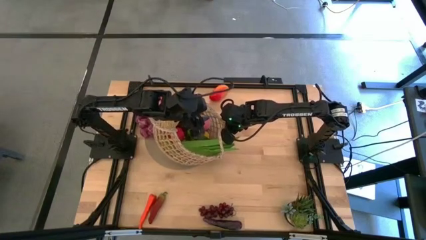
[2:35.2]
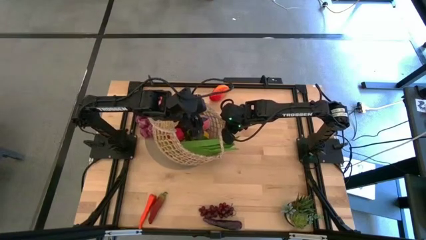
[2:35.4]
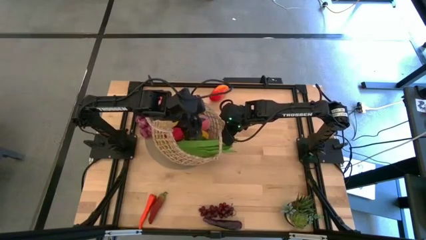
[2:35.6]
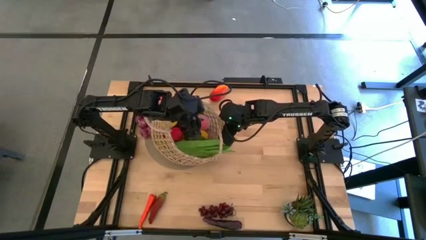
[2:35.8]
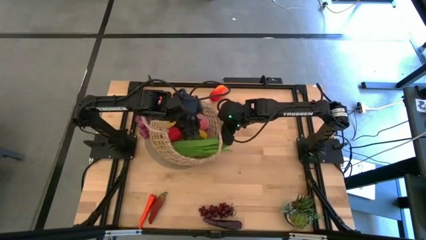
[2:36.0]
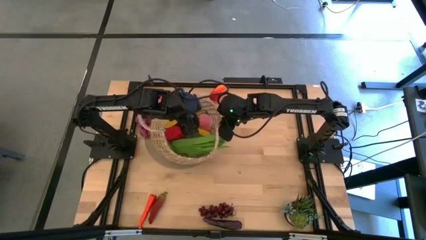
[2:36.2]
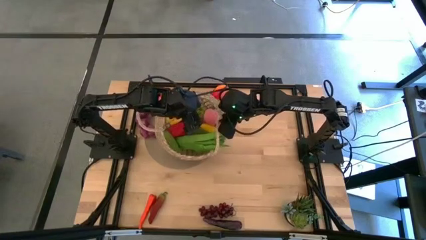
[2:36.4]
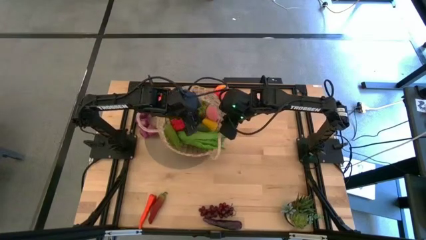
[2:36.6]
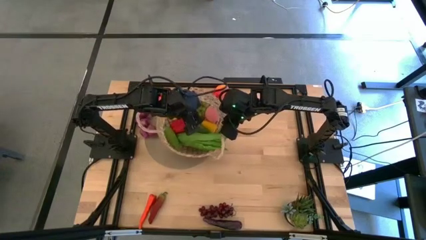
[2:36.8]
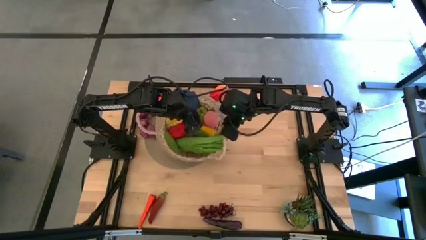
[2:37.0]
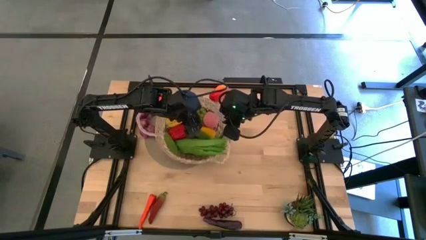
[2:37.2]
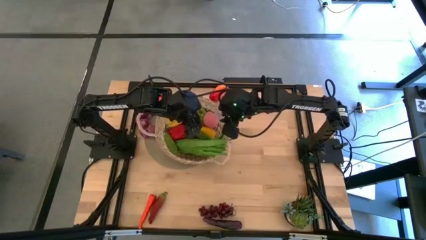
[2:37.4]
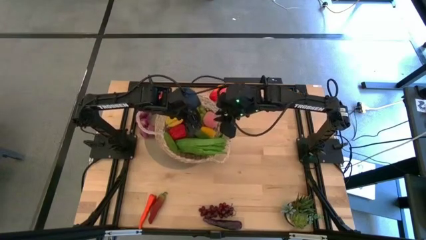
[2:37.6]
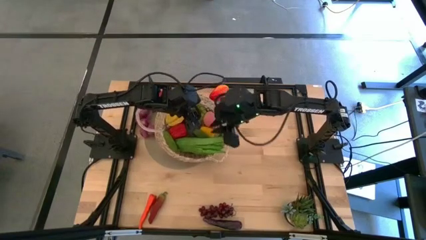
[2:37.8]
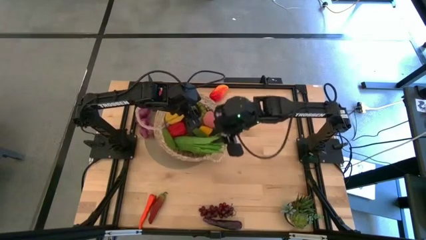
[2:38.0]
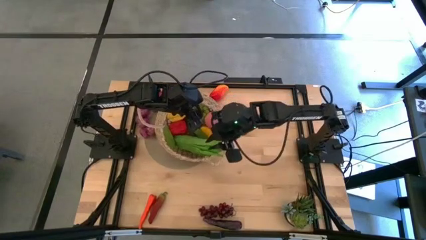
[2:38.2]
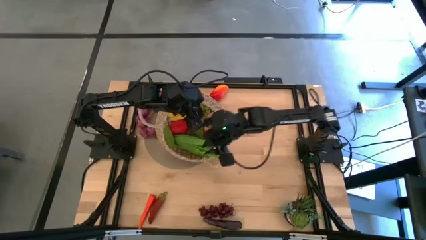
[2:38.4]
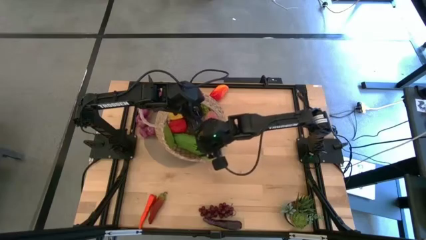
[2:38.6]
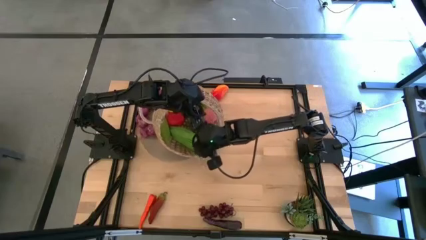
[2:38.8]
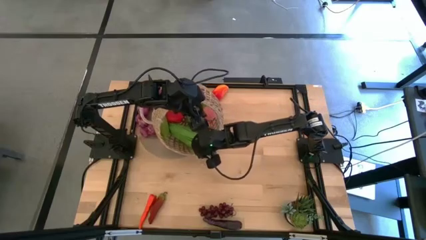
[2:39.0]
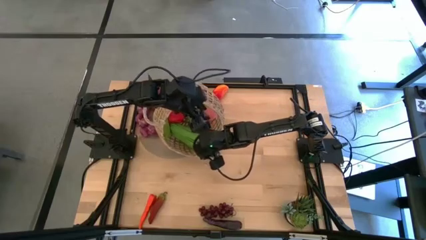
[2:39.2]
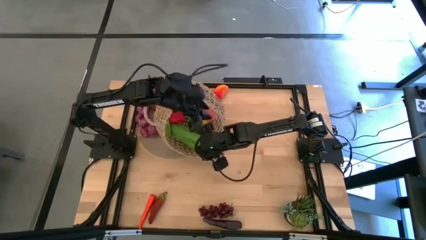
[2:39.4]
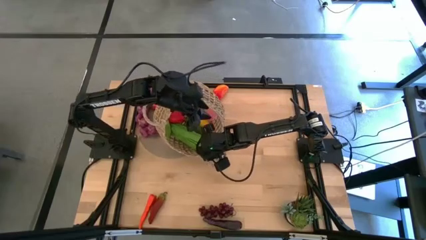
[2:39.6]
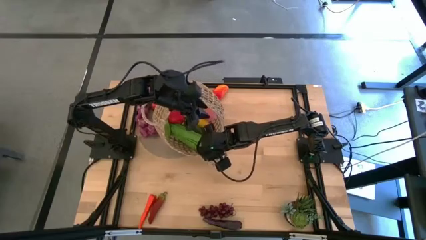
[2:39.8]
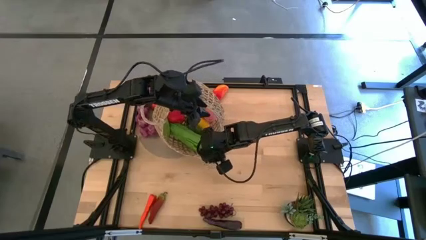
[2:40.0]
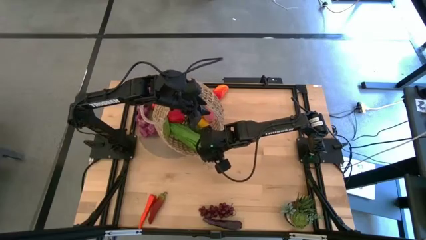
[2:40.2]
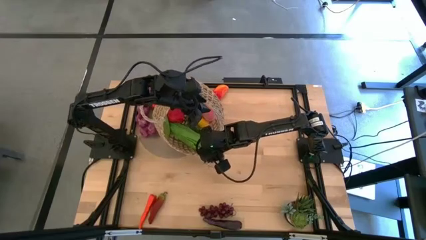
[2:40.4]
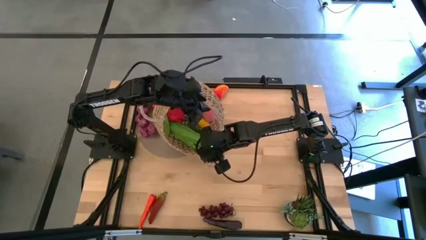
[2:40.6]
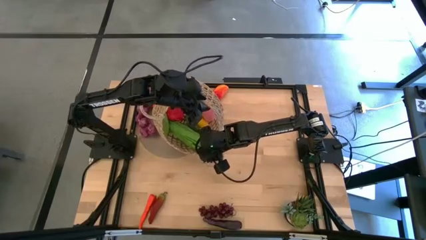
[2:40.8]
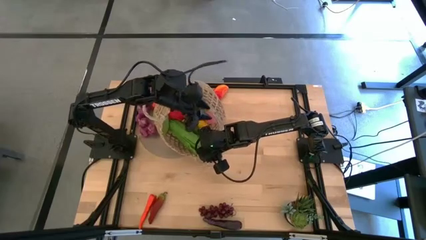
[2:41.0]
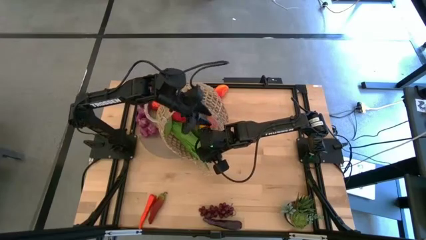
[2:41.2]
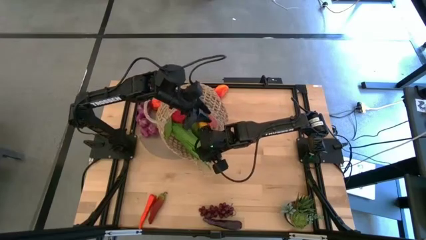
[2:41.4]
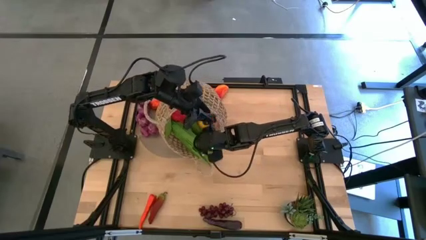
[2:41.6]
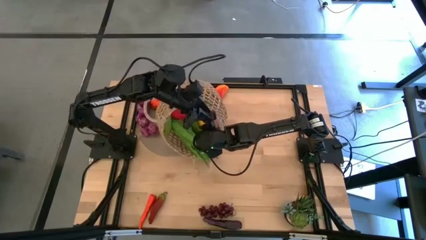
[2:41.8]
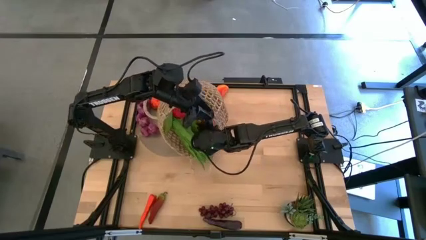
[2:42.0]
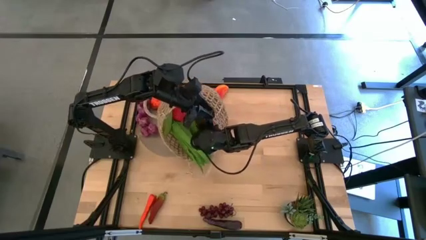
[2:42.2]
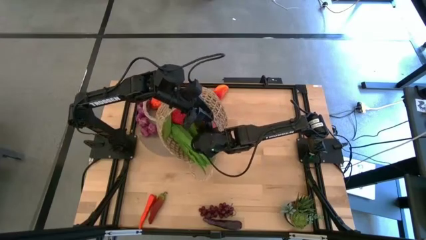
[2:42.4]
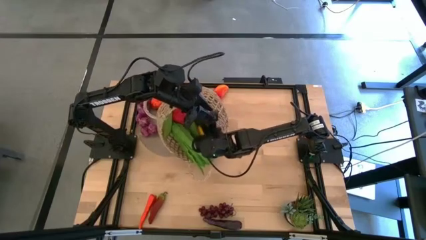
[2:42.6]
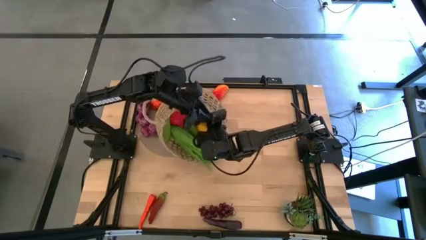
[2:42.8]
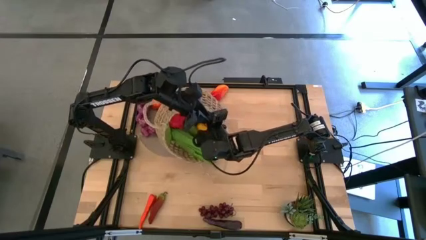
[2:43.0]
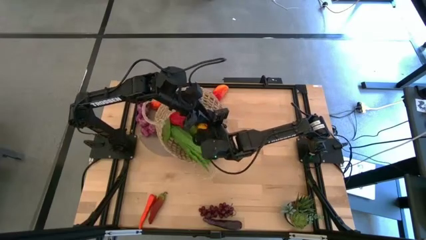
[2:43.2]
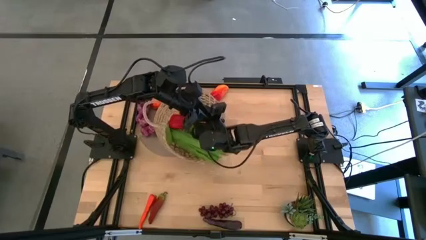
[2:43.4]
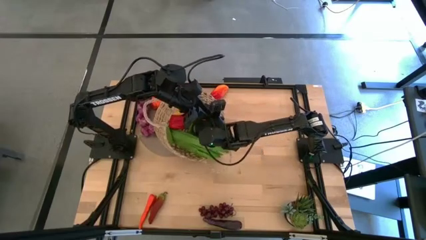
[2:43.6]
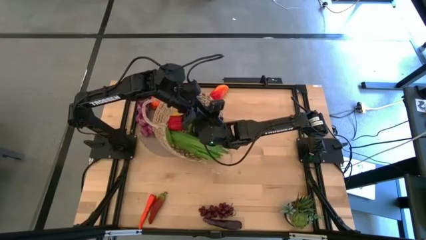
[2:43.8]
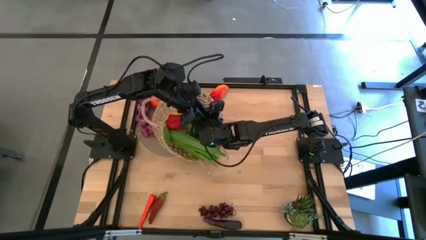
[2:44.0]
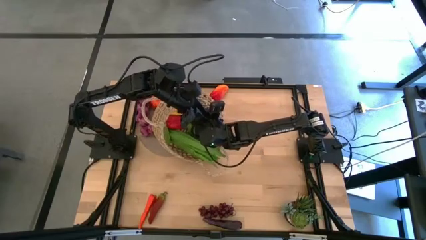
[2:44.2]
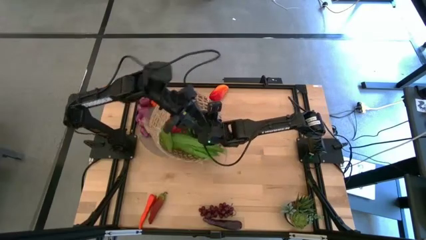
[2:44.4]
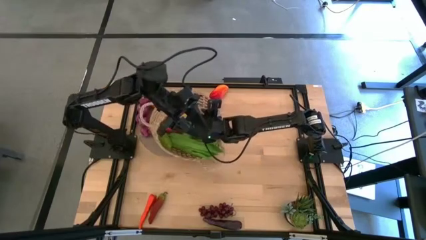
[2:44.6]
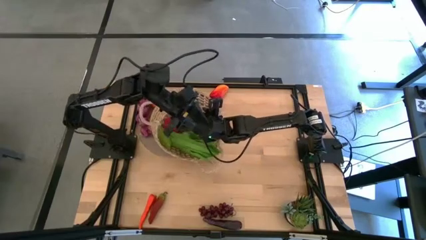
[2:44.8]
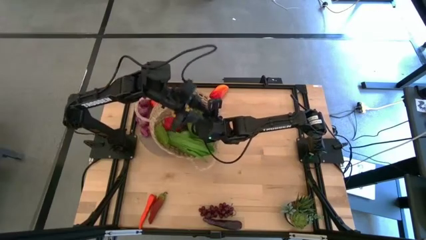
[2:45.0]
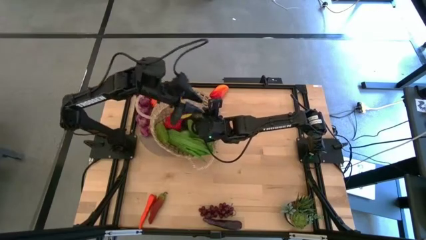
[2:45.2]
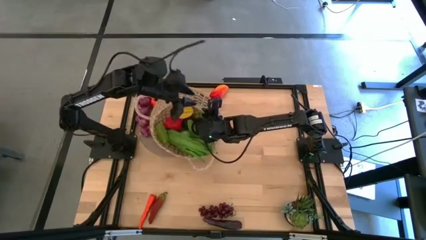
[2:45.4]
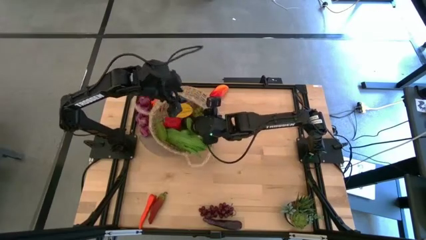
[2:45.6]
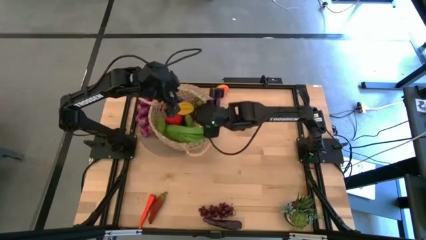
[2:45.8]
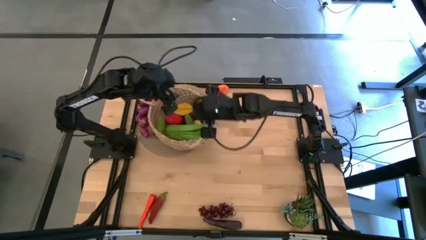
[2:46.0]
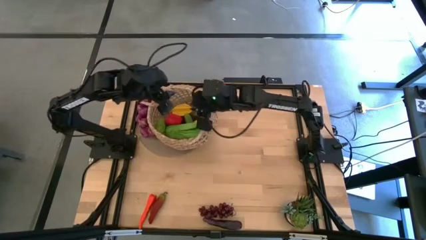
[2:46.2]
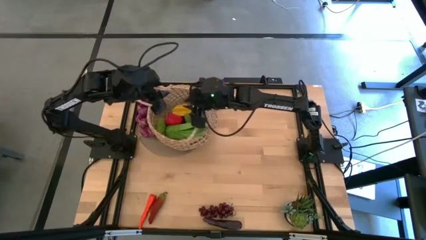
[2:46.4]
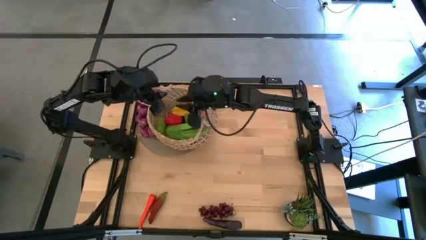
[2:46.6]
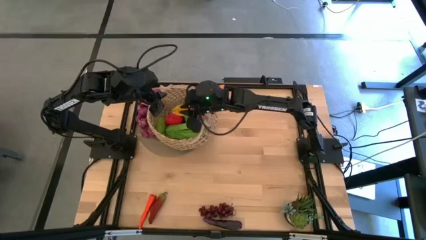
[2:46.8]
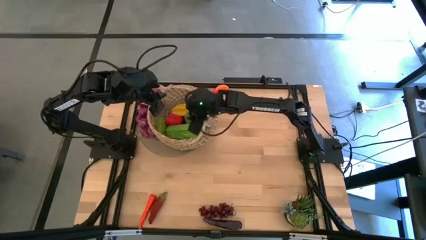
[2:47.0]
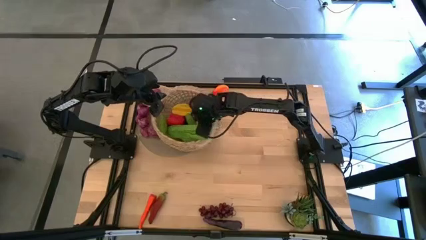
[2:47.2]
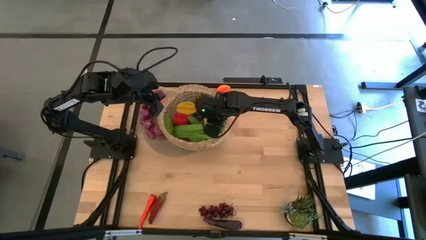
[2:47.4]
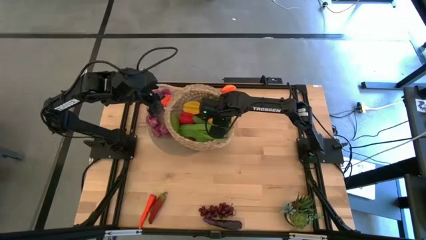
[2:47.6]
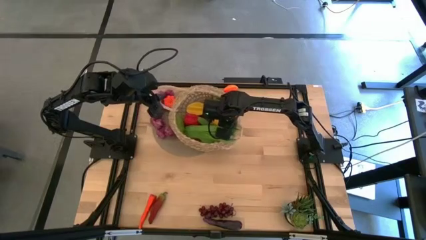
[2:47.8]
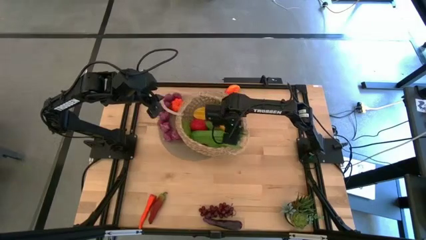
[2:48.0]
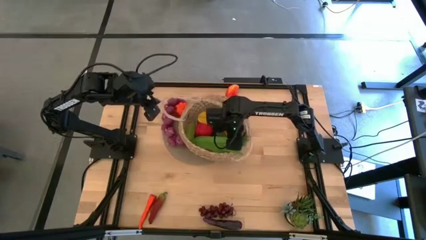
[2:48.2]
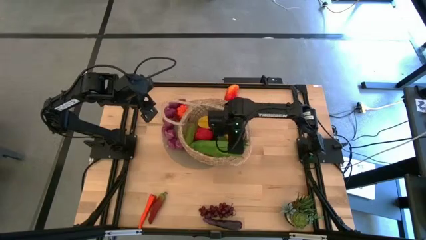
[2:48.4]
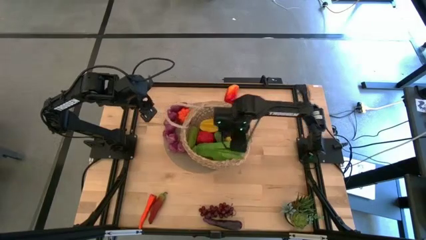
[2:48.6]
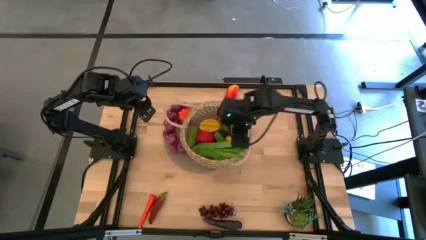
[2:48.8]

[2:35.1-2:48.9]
Task: Build produce basket
Adjust the brown basket
